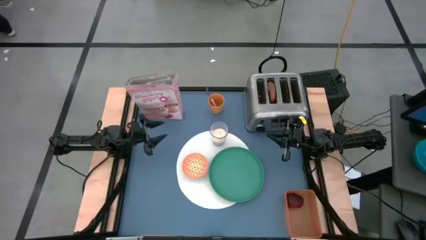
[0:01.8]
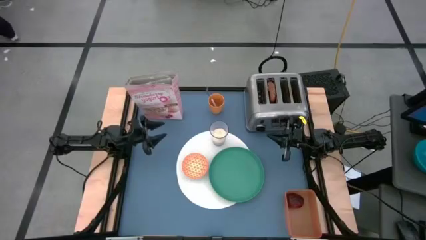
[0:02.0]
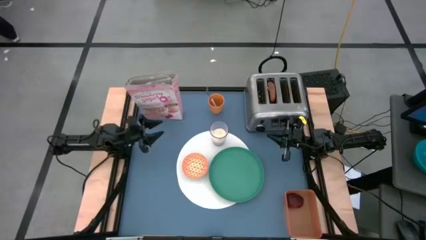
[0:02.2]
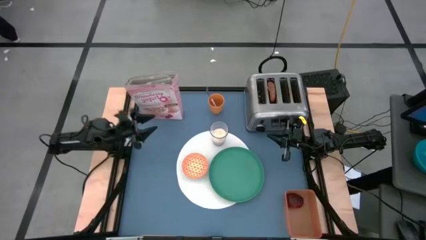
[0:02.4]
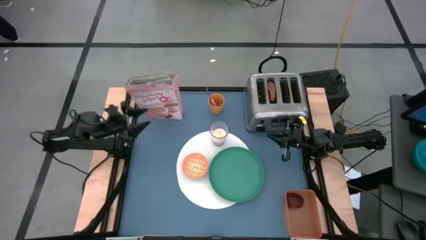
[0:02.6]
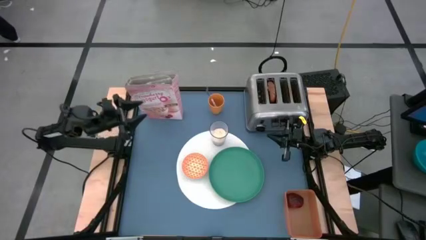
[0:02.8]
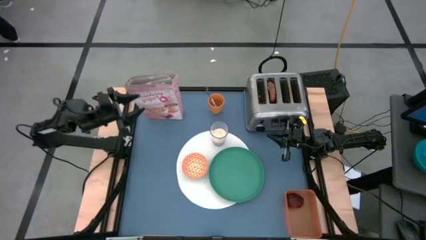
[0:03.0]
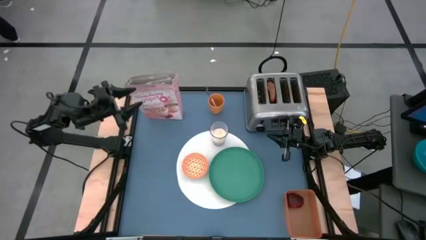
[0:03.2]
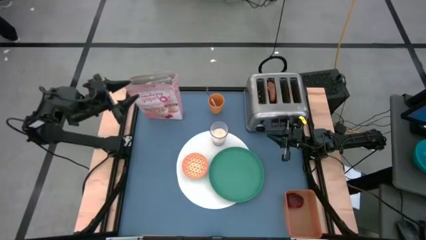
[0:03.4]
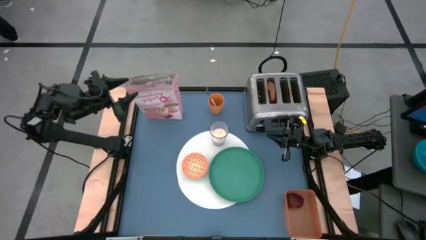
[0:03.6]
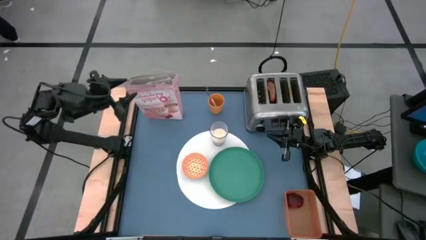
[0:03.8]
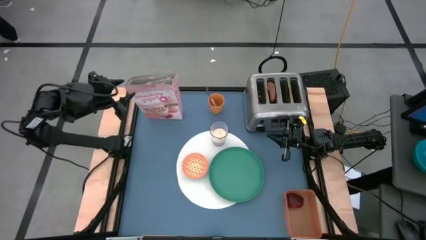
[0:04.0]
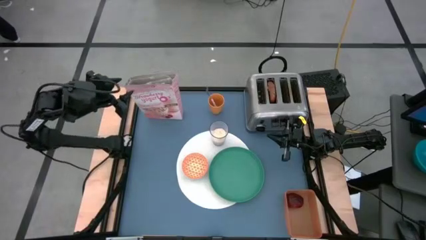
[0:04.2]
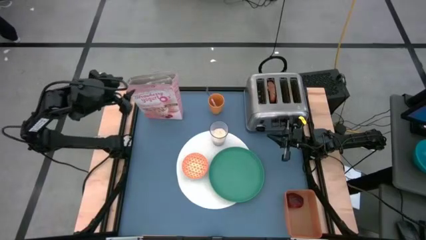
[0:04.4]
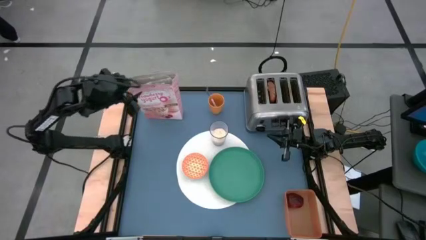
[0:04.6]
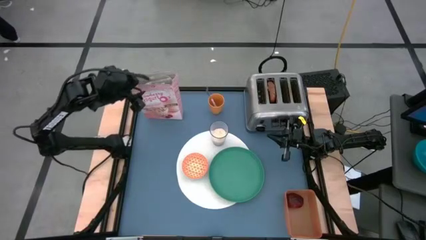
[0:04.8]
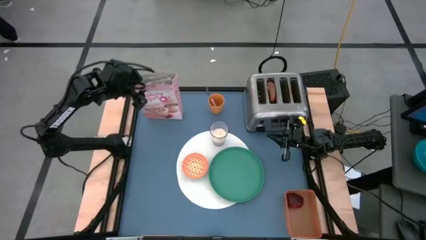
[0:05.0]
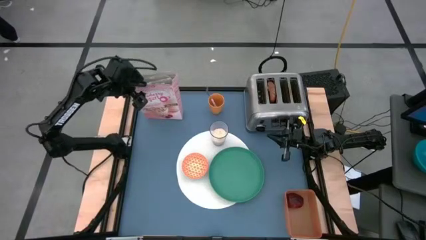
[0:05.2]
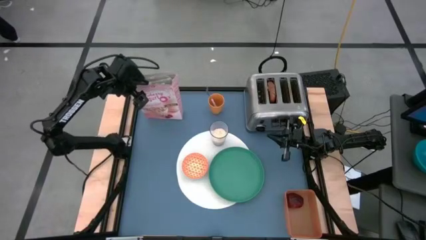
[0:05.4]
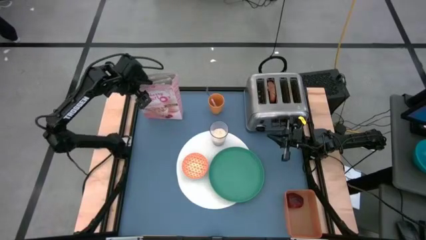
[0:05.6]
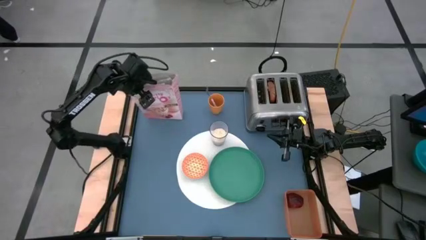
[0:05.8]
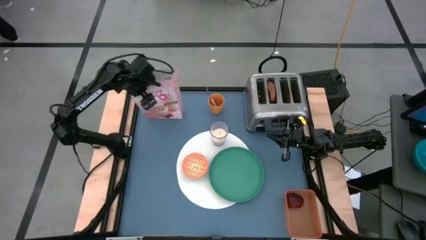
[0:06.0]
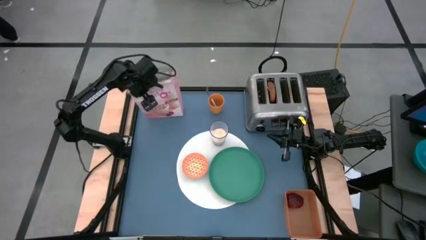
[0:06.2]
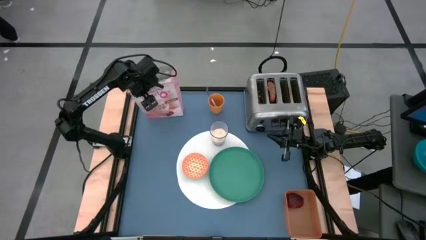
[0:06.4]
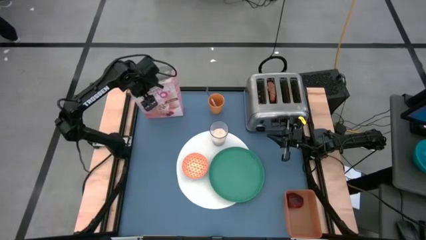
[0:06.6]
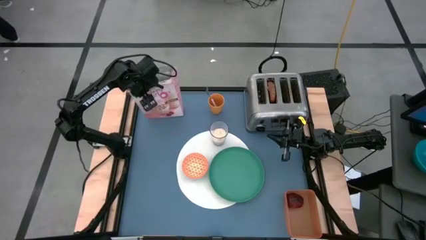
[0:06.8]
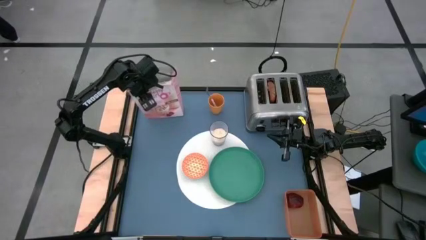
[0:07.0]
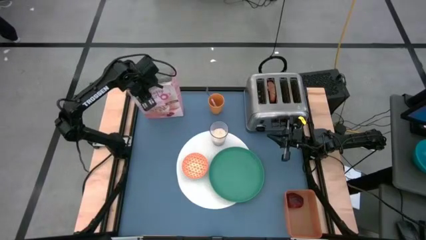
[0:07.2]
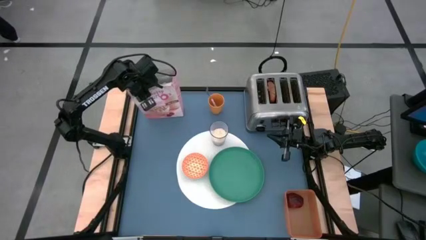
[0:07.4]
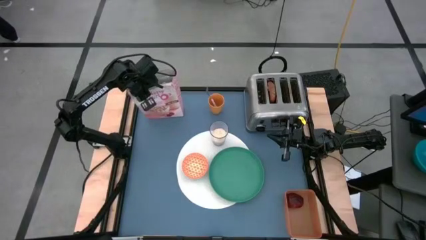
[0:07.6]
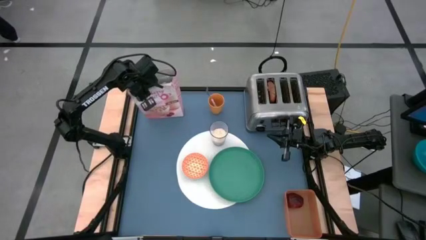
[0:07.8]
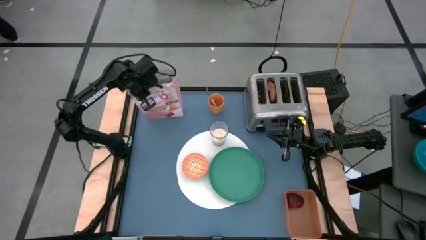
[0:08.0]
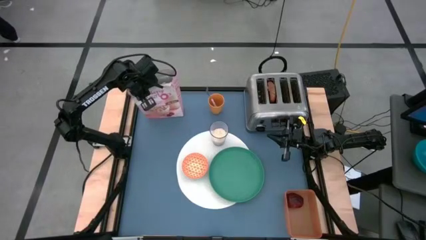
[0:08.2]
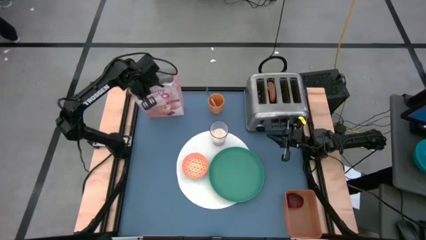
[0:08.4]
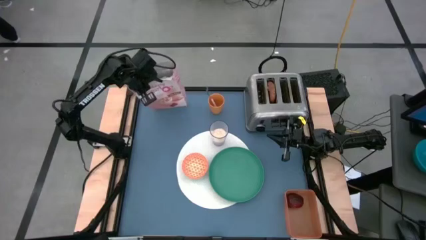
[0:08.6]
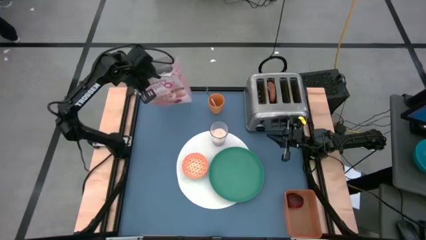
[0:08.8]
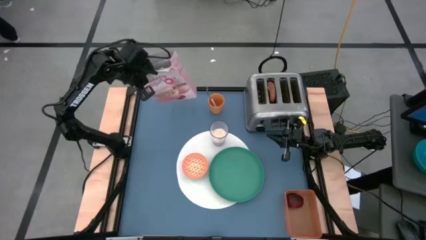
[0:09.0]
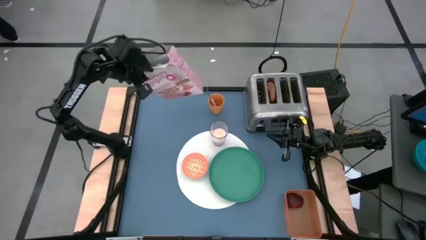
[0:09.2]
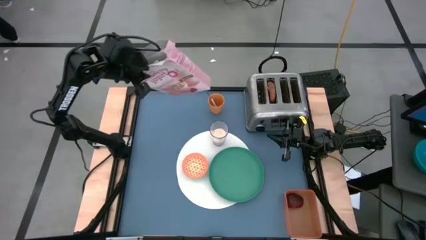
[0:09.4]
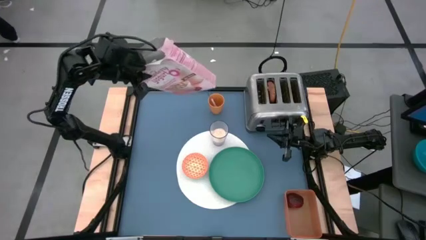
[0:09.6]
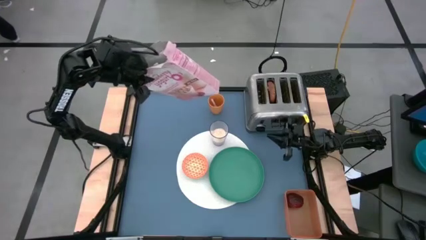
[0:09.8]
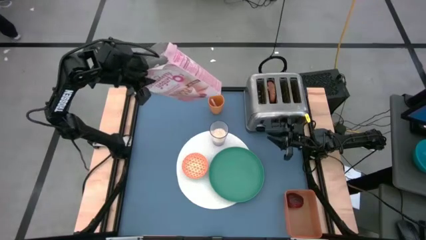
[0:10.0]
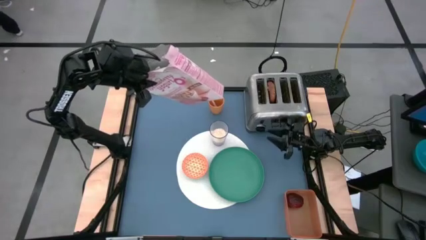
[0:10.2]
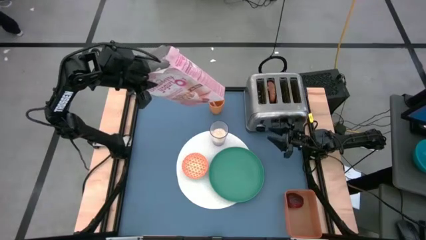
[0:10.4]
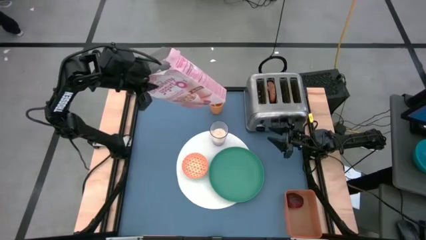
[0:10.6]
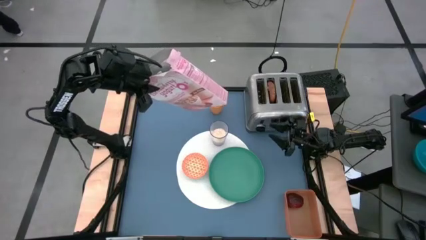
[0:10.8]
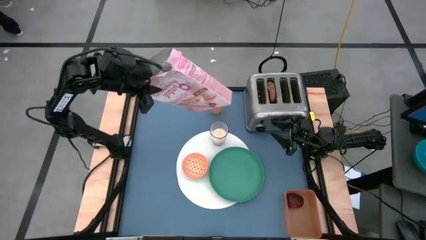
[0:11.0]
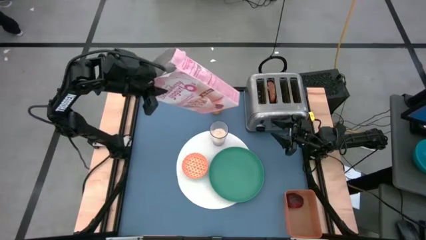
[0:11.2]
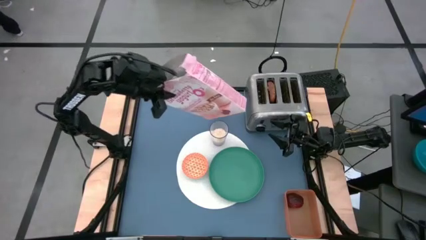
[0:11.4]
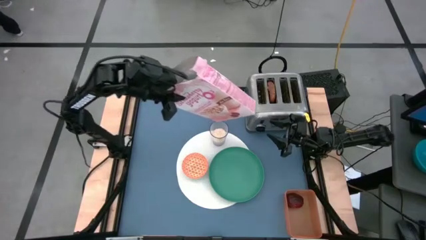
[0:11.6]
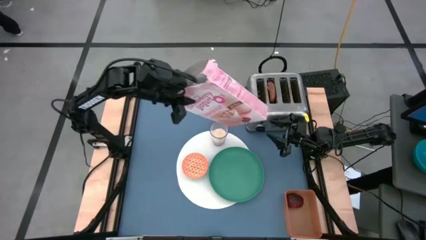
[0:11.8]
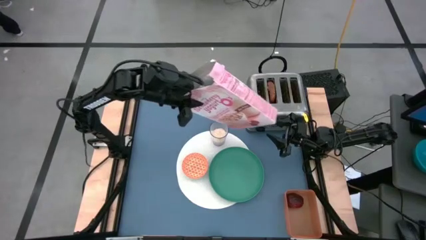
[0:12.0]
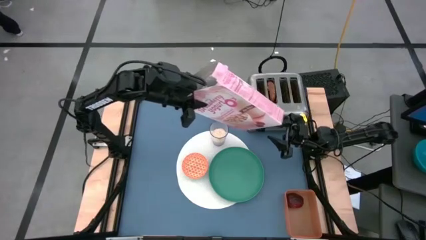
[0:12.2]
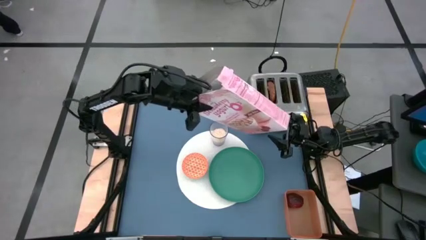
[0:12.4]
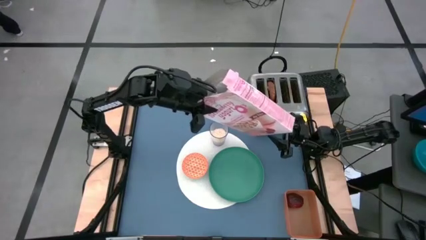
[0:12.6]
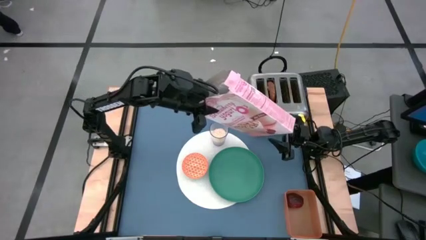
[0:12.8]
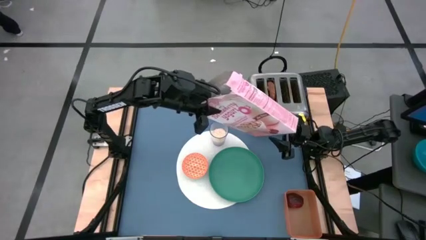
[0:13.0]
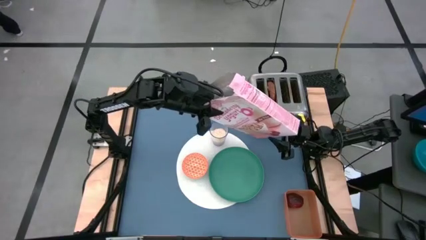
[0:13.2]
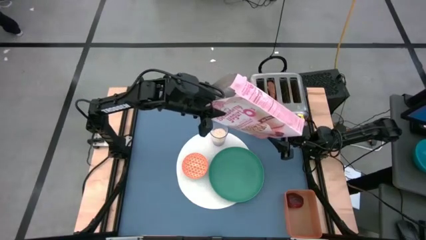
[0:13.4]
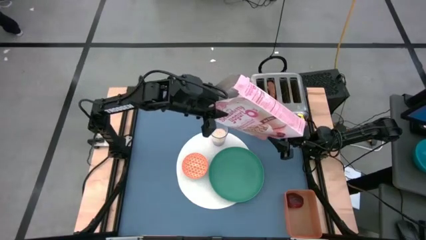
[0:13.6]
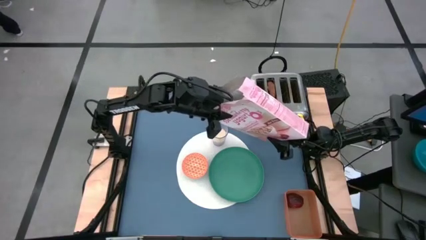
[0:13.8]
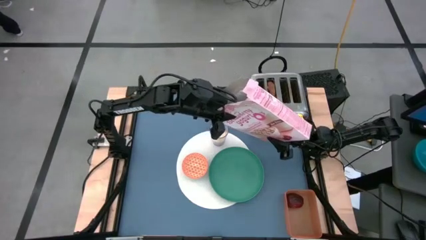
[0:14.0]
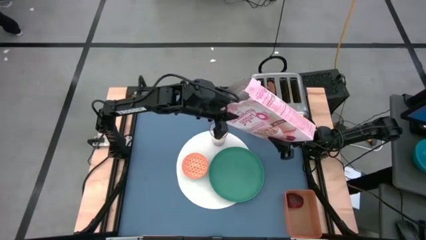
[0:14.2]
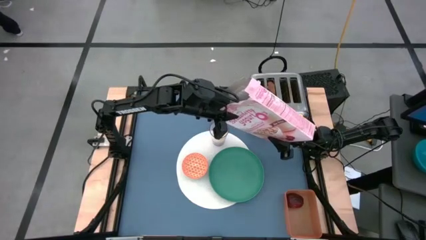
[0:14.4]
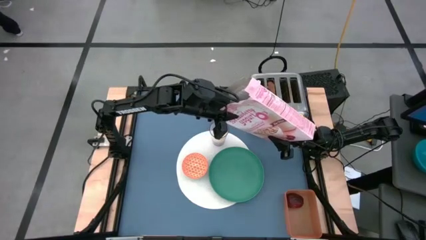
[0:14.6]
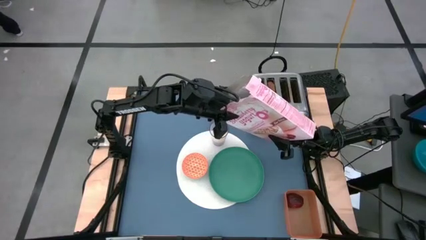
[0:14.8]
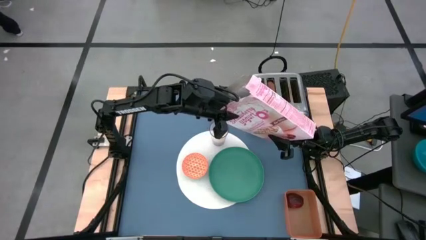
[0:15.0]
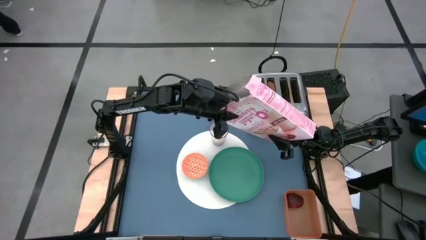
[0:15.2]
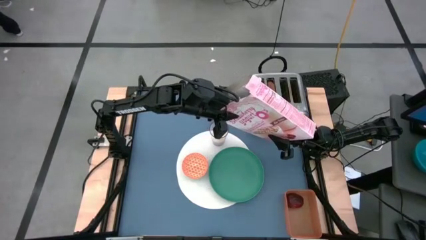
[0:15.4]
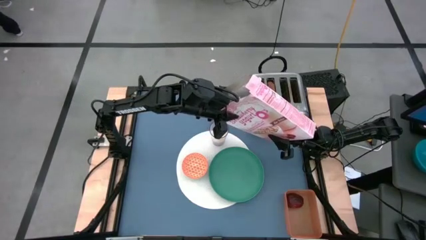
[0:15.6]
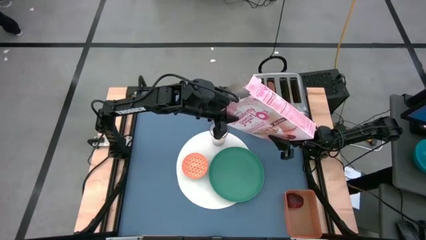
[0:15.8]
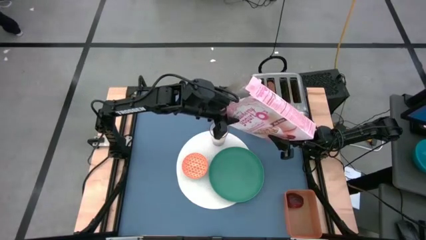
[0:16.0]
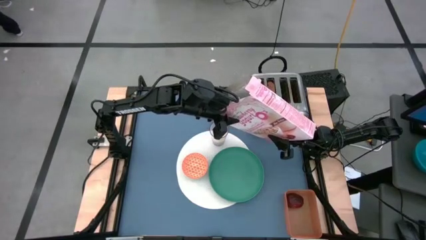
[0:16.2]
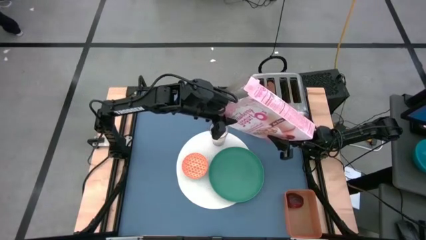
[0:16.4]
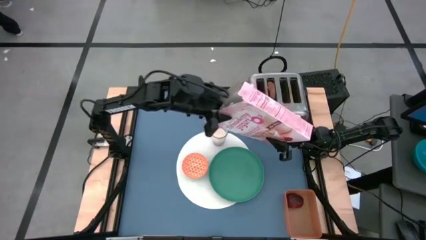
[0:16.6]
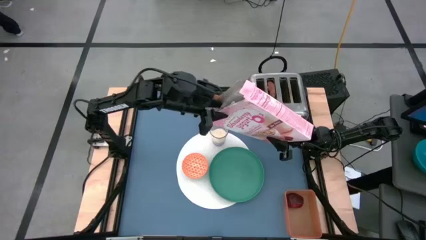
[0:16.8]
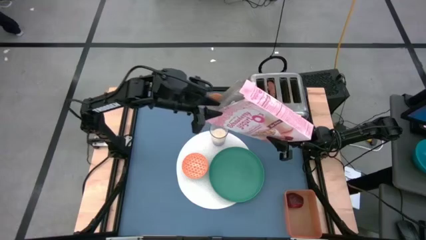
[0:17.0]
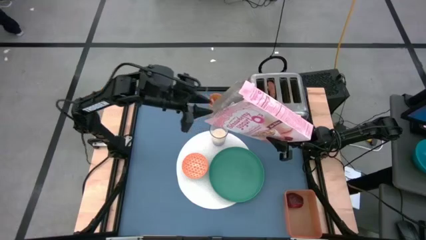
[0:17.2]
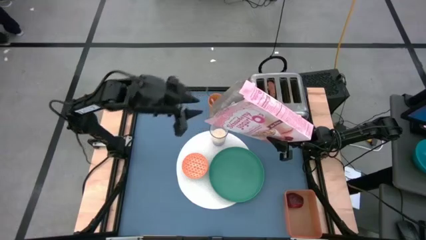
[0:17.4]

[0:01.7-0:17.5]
Task: Arrange a breakfast setting
Pour the cereal from the cereal box into the orange bowl

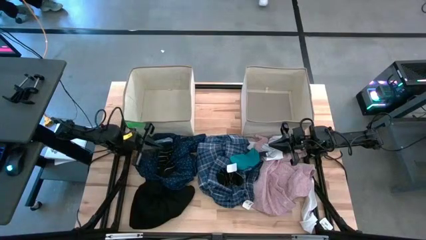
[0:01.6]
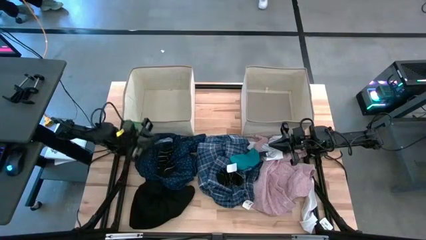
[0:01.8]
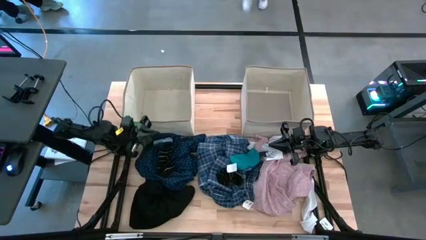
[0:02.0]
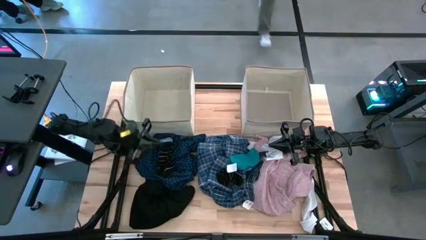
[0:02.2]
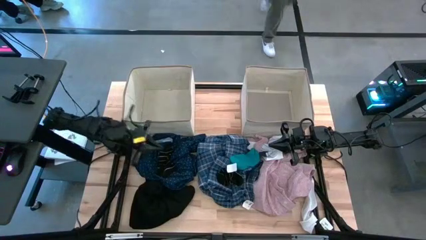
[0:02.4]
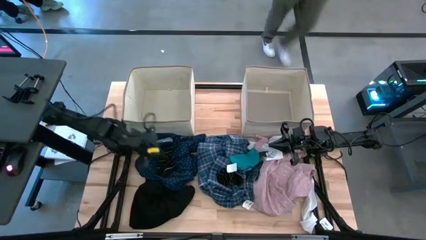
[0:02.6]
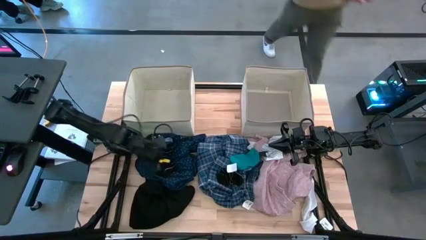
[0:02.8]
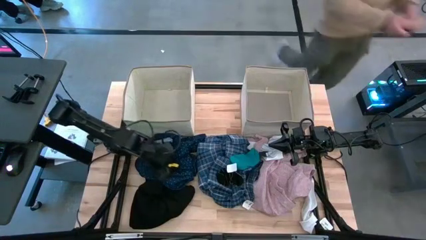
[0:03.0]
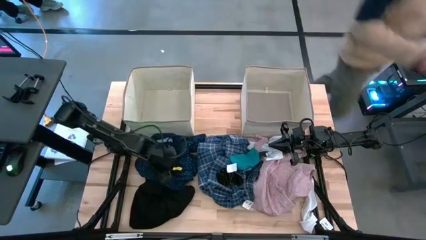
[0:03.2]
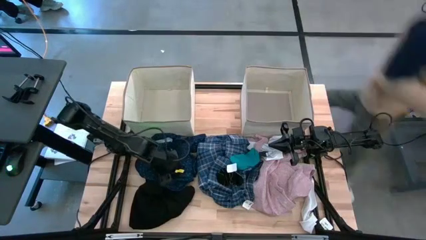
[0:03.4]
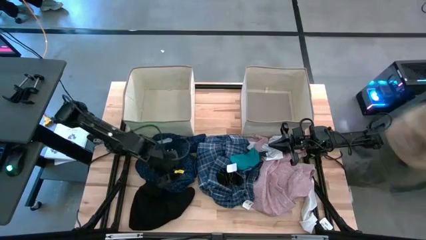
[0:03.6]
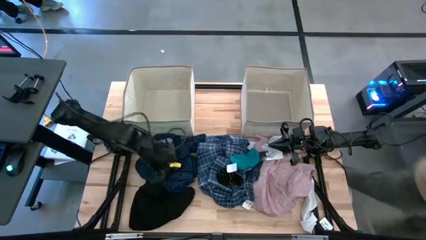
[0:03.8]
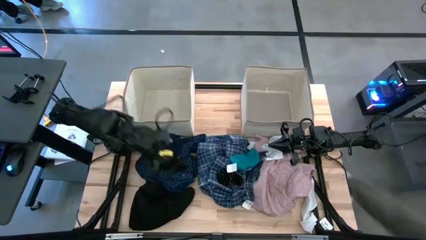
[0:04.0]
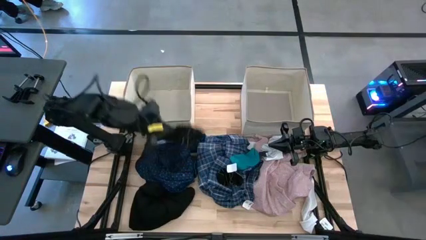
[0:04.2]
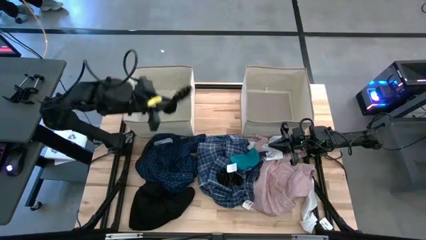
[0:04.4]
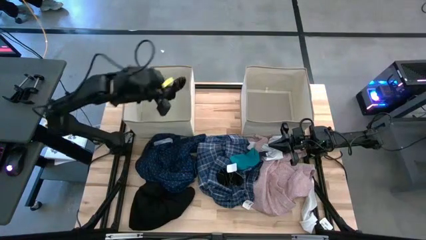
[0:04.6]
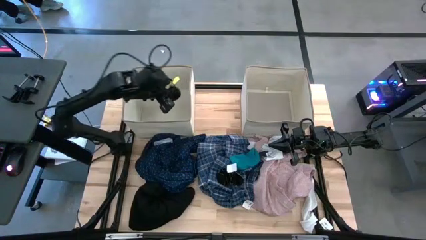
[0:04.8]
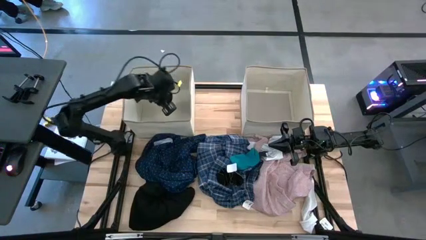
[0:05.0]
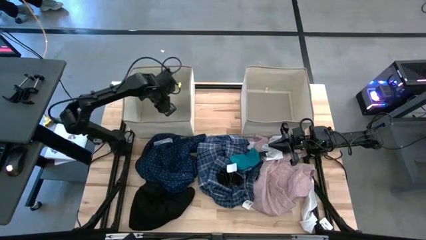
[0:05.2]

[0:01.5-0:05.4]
Task: Sort clothes
Put the black sock into the left laundry bin
